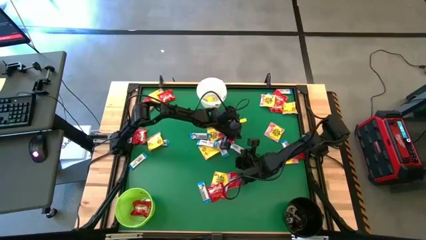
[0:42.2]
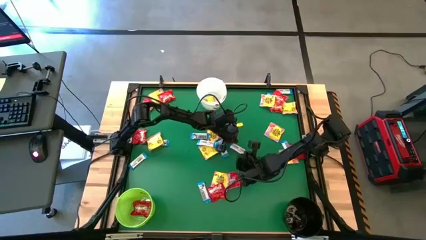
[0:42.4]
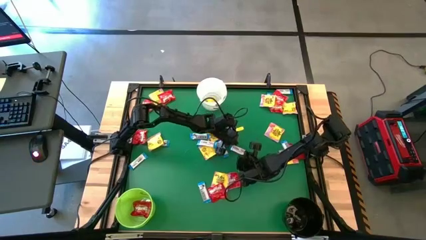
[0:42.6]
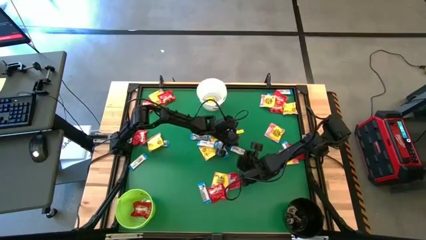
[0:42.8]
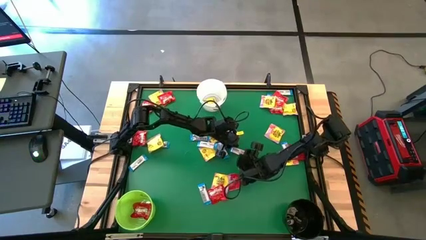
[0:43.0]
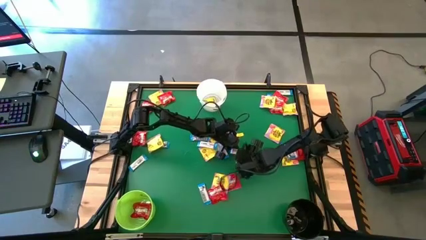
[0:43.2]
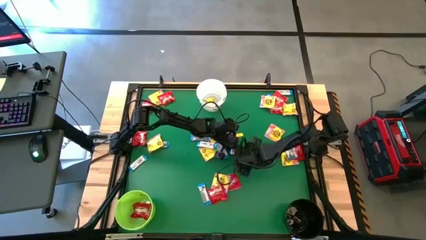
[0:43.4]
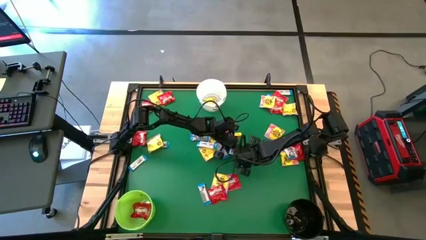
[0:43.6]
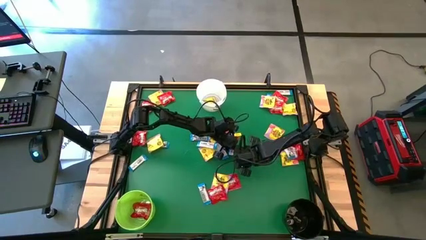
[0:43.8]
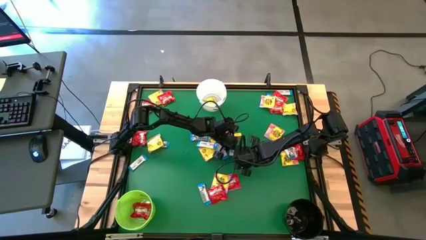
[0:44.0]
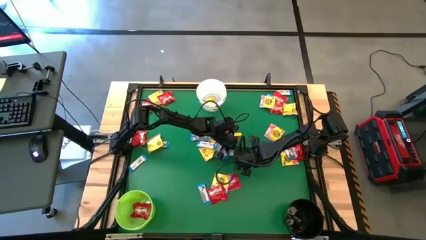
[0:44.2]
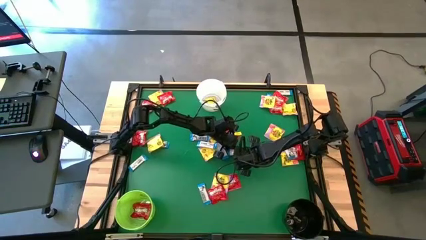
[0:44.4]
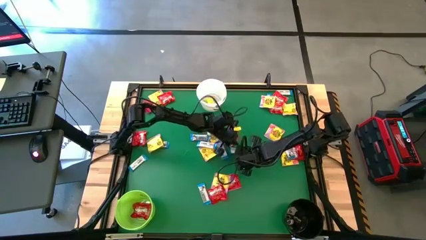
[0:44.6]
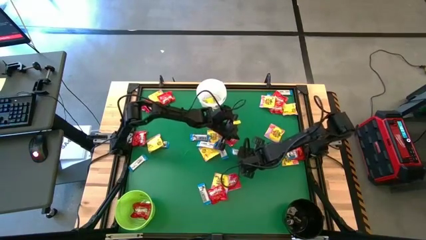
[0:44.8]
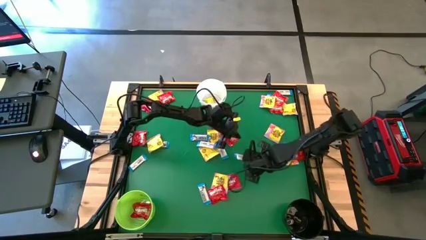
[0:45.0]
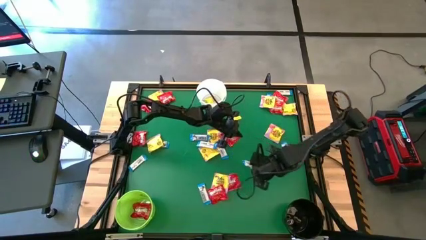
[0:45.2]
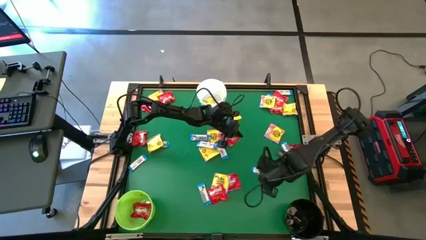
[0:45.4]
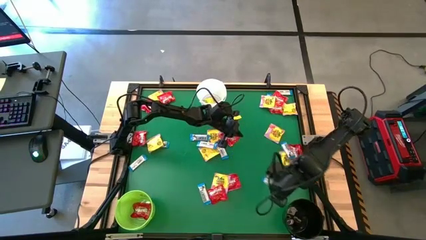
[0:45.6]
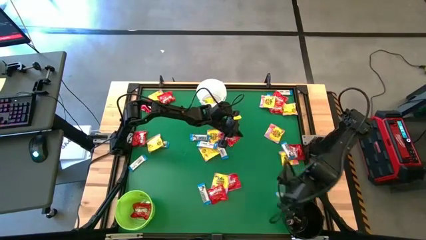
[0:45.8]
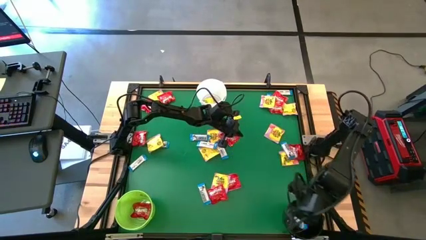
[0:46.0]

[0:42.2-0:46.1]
Task: Sort candy by brand, put in halloween buckets
Put the white candy into the black bucket

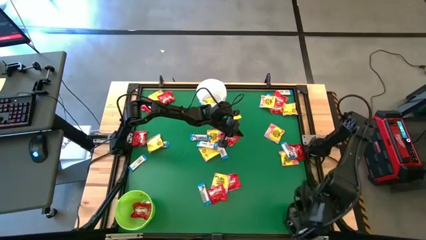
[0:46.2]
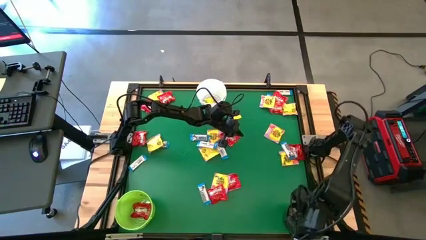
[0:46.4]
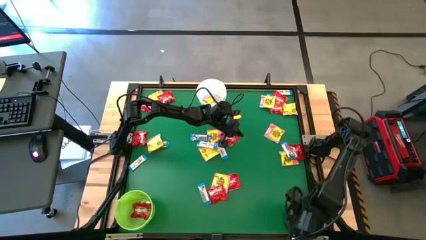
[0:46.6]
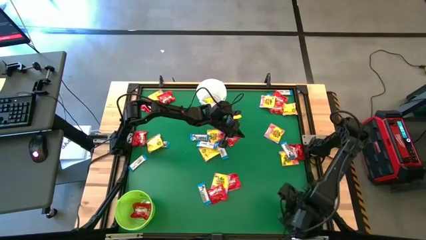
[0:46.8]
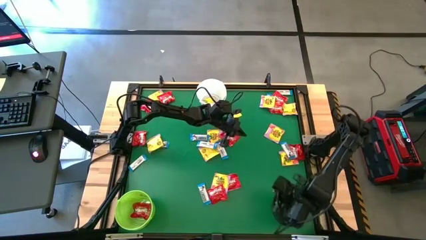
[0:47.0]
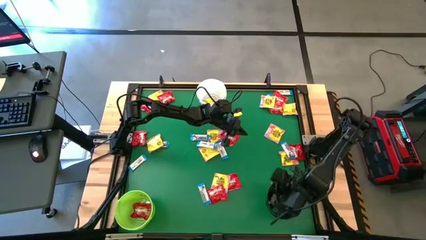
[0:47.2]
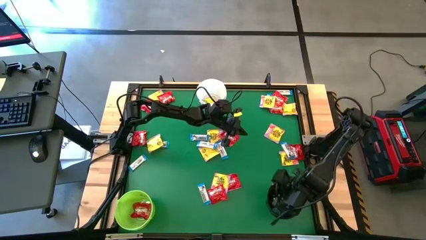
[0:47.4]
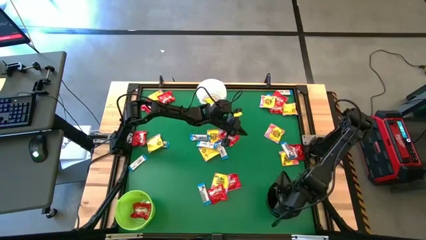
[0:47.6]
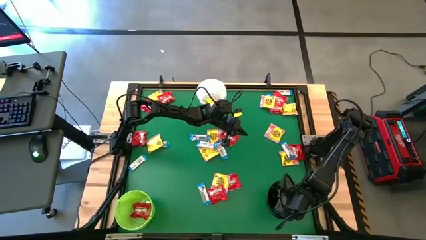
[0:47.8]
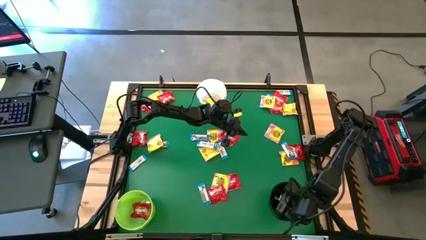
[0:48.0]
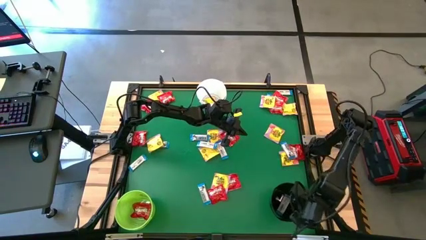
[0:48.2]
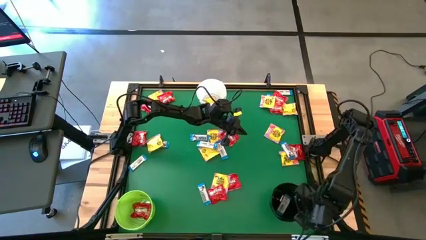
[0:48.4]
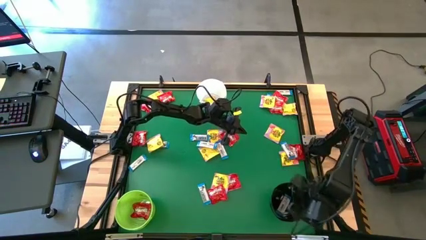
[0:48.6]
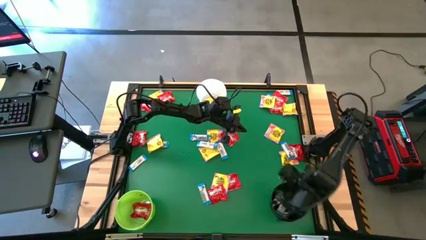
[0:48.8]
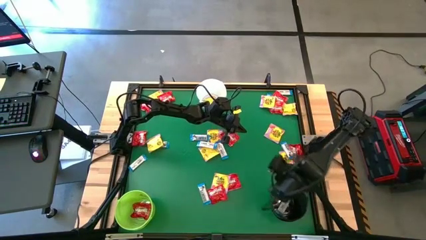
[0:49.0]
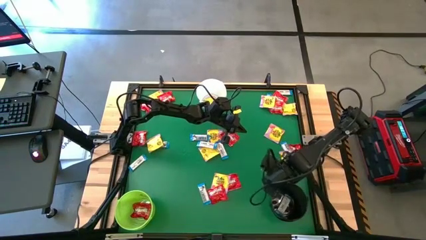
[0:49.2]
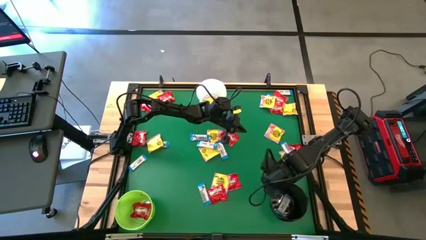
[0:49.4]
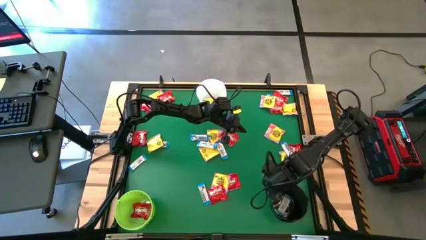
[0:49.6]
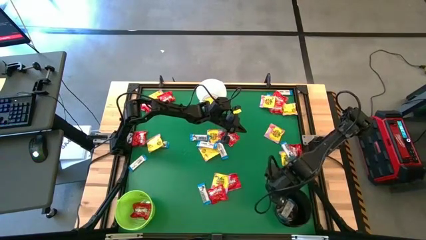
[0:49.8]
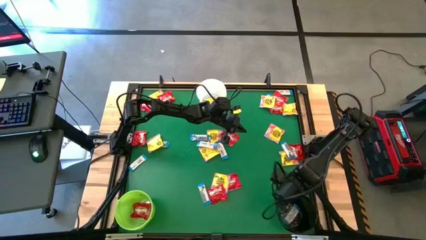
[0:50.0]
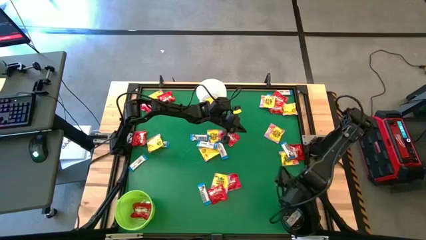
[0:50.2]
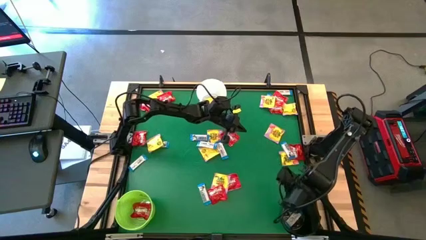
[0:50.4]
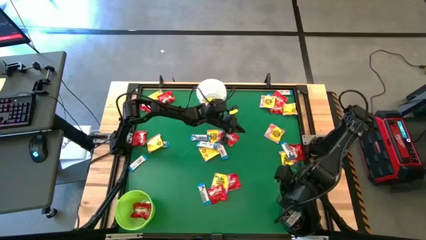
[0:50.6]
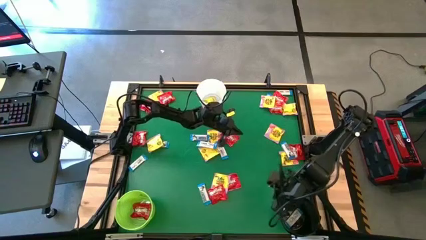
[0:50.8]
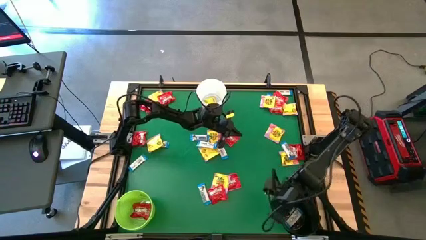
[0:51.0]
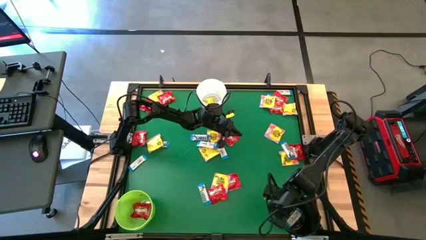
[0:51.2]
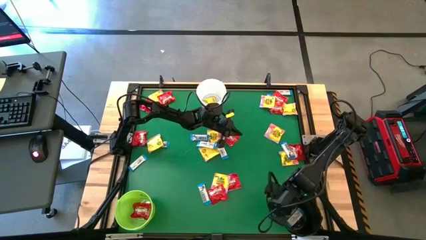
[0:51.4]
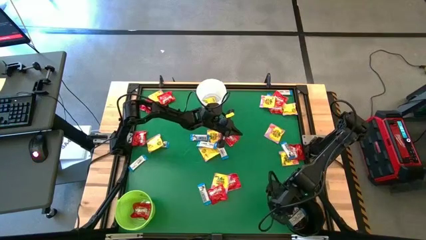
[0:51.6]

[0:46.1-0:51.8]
Adjust the black bucket

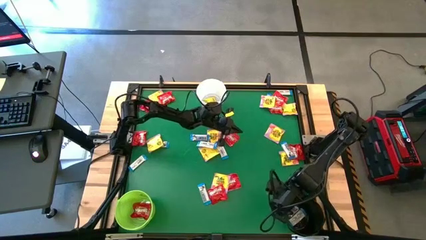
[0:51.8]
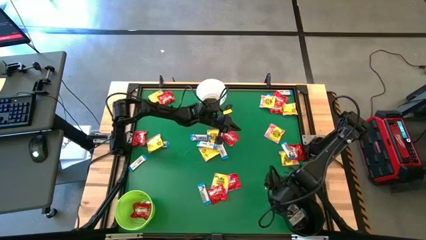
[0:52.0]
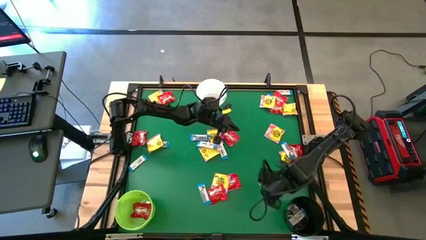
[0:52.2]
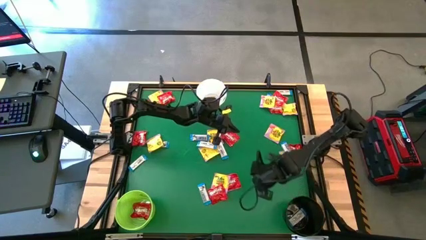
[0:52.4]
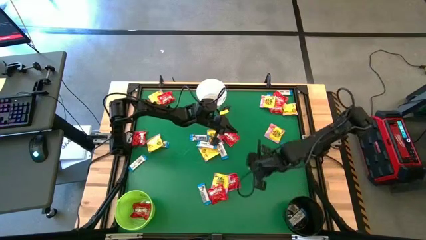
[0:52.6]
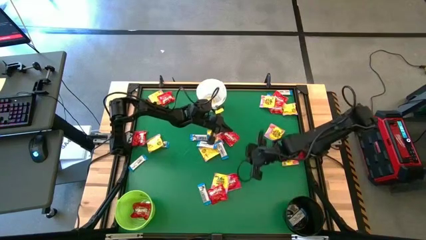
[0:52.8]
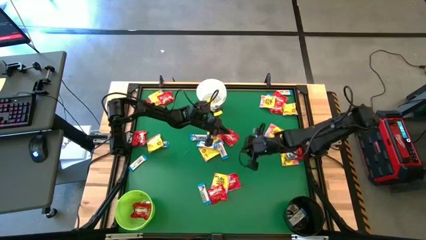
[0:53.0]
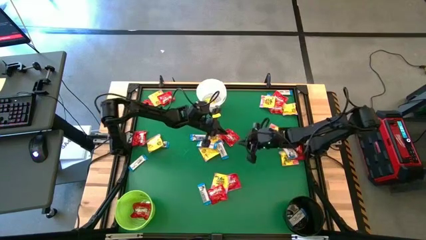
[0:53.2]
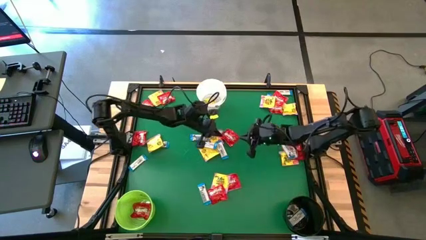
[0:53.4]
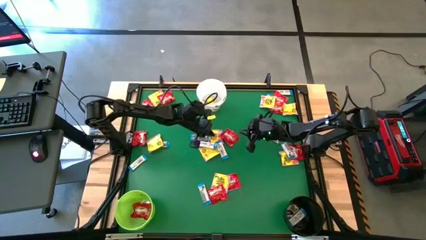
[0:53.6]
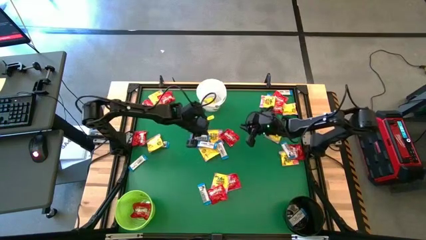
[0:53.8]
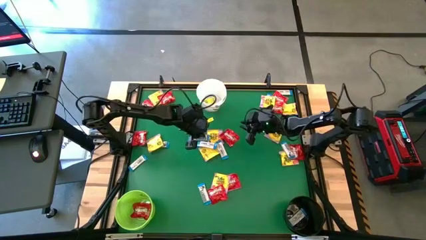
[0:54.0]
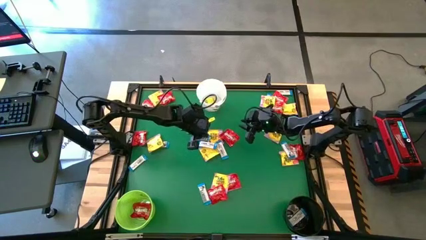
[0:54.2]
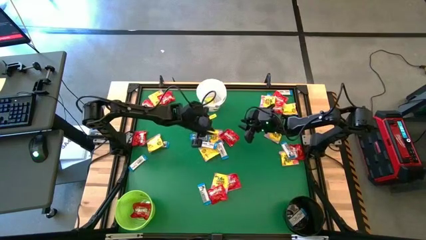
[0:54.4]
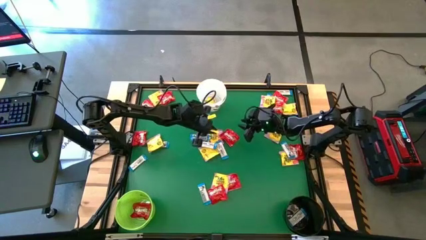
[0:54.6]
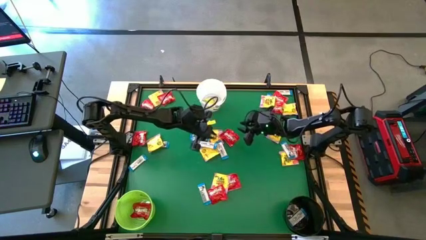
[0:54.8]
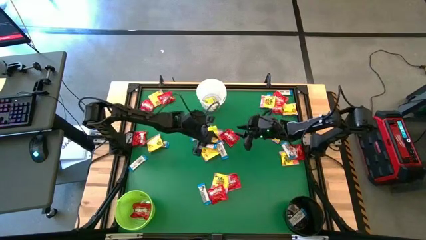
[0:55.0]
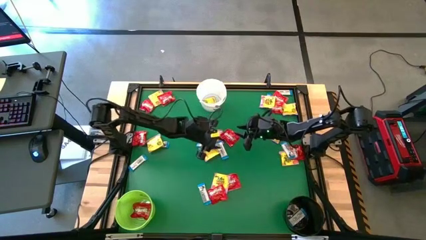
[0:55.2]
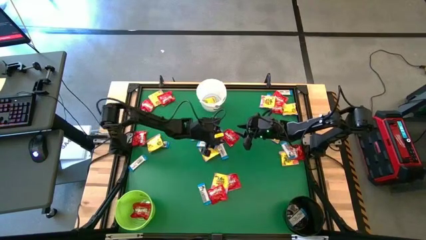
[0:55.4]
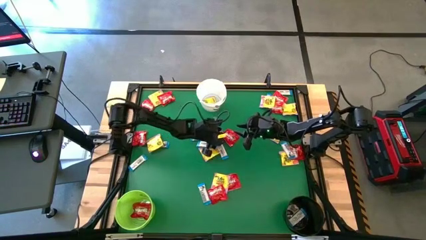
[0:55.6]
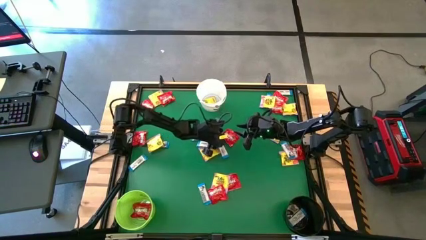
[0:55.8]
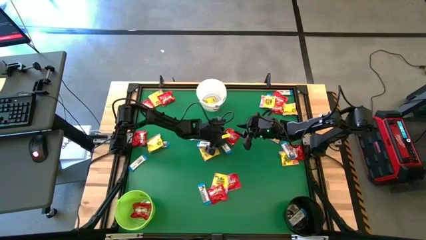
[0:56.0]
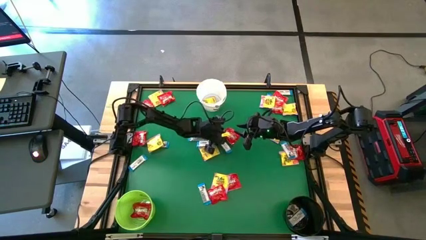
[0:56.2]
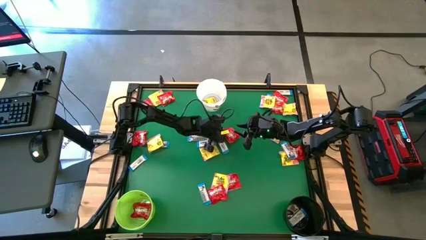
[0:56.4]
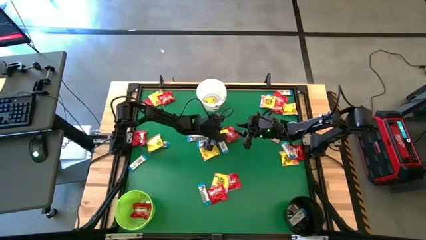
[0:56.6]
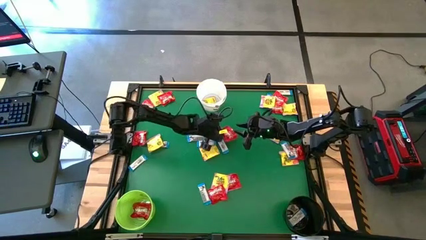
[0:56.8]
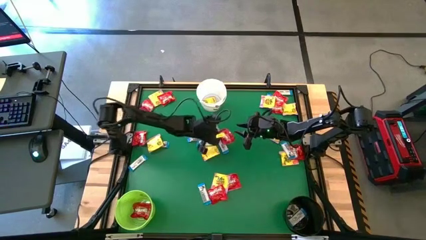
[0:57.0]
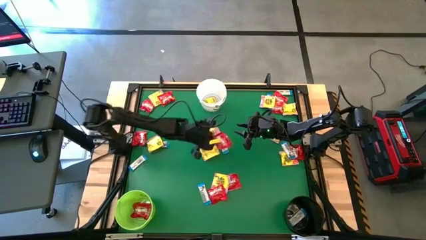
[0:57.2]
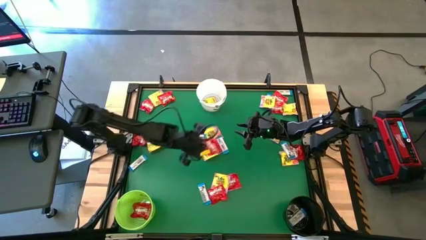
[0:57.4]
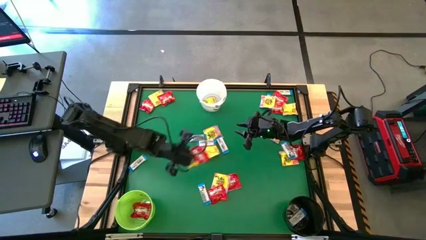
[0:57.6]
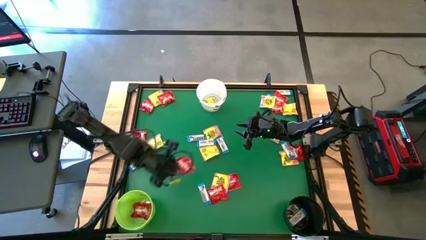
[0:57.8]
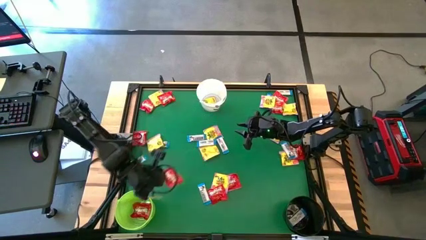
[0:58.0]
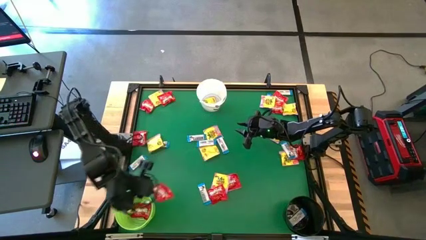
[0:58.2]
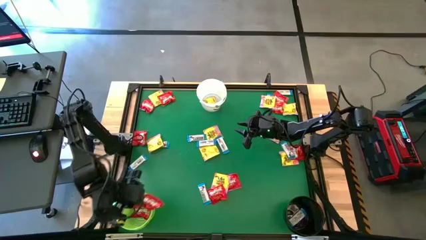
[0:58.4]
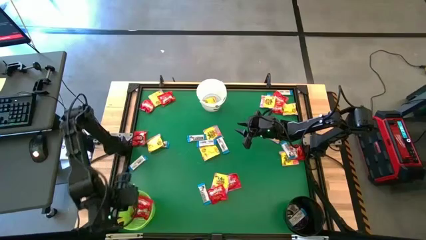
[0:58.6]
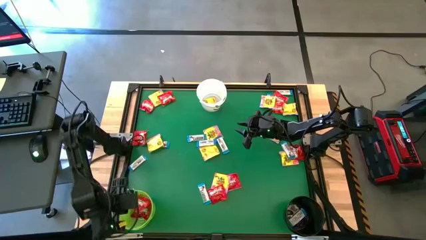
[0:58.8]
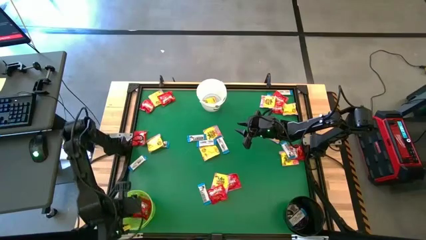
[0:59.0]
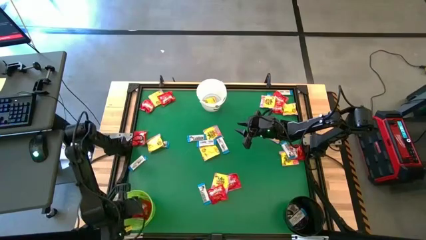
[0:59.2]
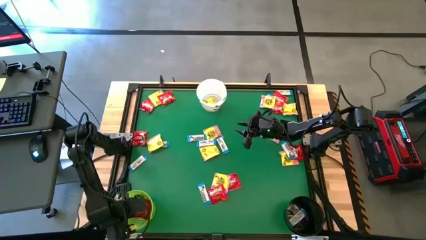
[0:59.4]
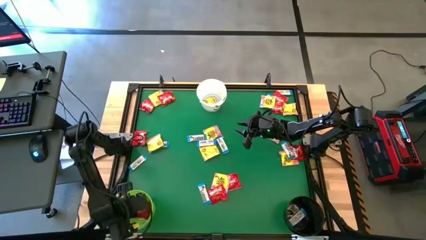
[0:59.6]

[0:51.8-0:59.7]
Put the red candy into the green bucket
